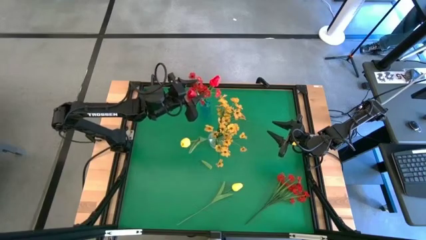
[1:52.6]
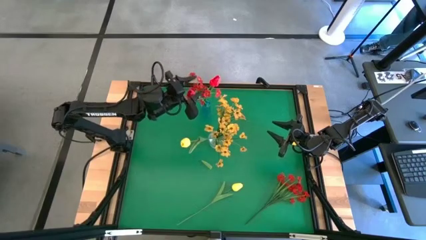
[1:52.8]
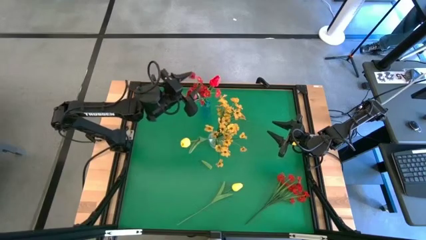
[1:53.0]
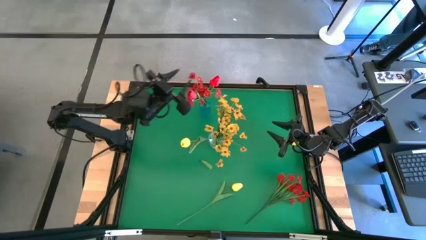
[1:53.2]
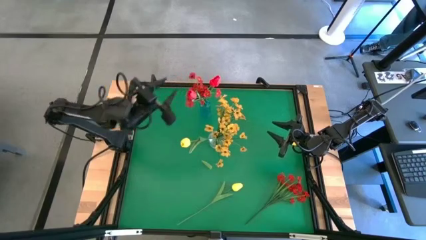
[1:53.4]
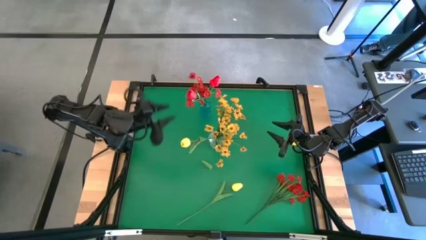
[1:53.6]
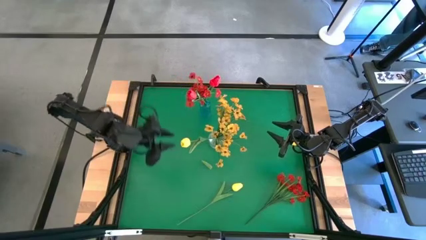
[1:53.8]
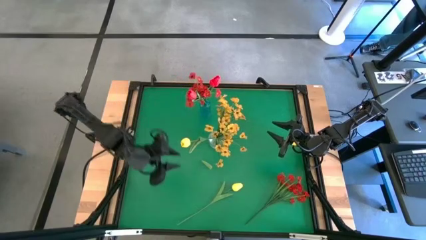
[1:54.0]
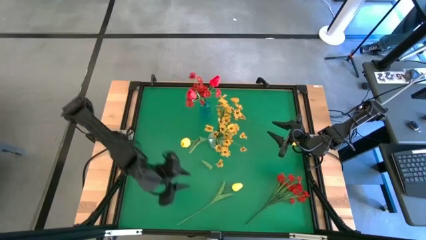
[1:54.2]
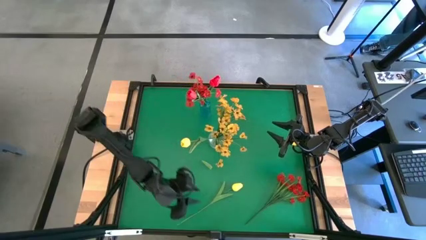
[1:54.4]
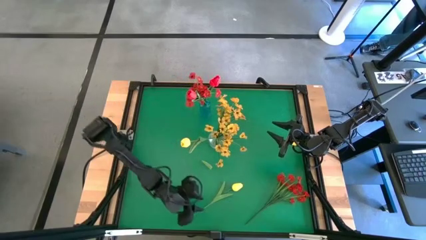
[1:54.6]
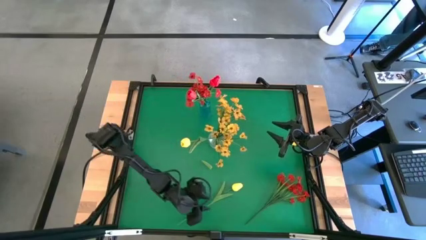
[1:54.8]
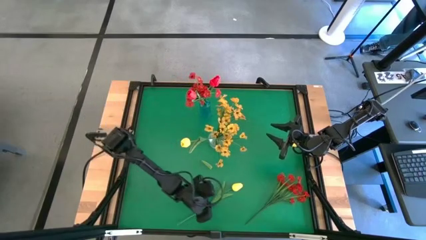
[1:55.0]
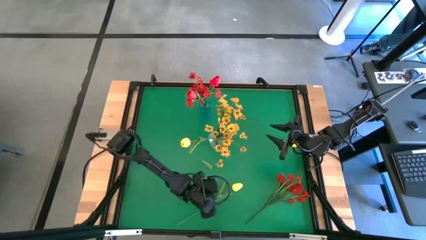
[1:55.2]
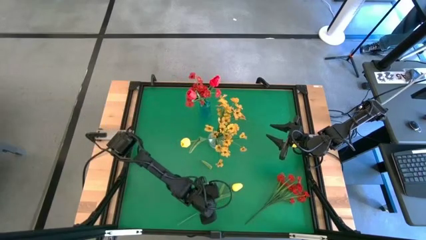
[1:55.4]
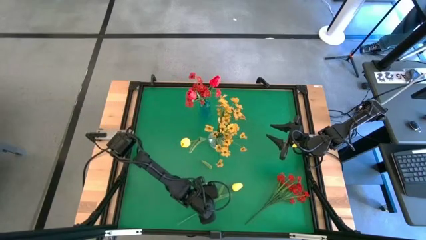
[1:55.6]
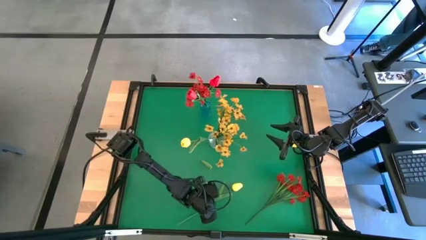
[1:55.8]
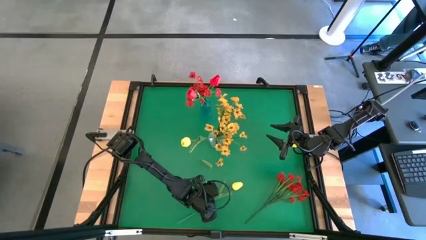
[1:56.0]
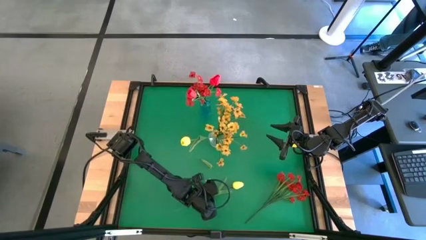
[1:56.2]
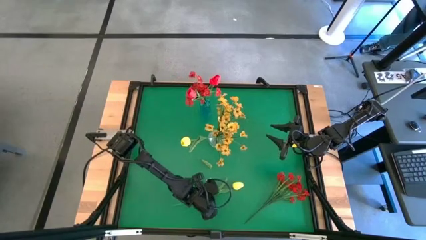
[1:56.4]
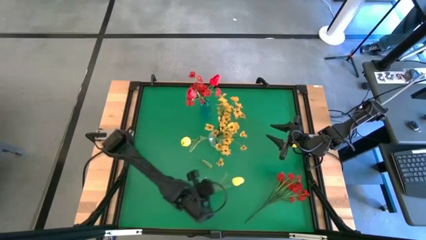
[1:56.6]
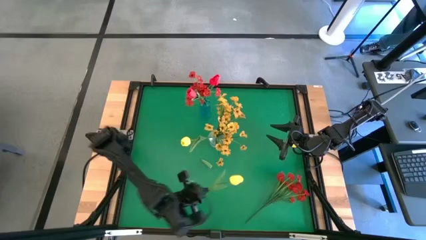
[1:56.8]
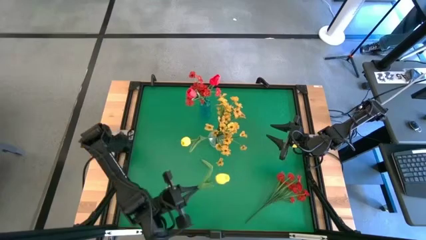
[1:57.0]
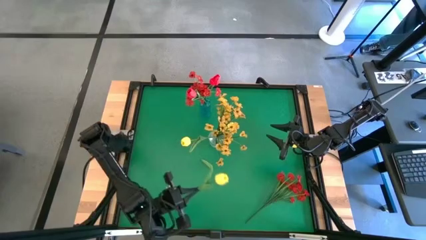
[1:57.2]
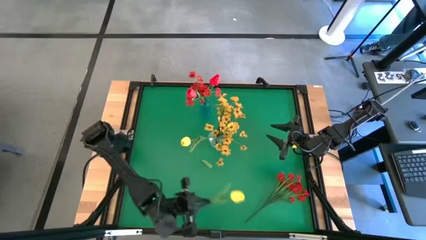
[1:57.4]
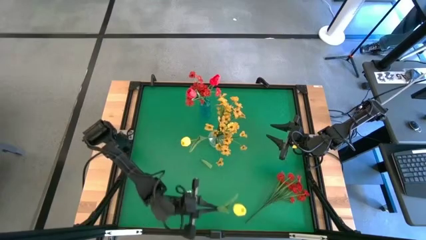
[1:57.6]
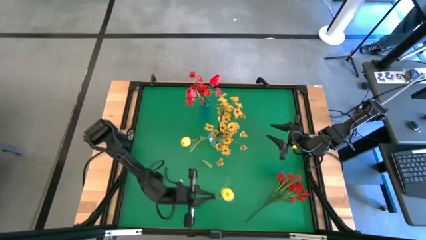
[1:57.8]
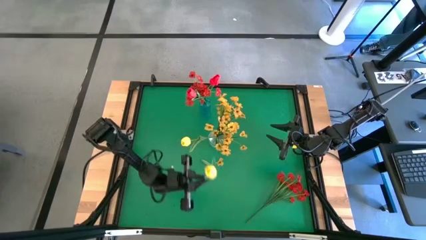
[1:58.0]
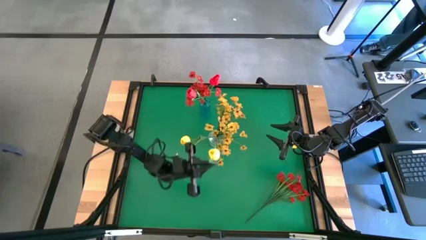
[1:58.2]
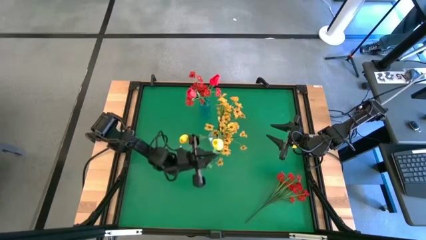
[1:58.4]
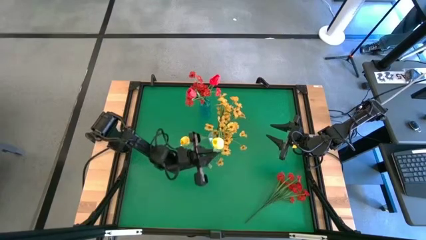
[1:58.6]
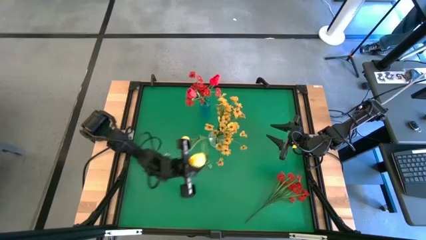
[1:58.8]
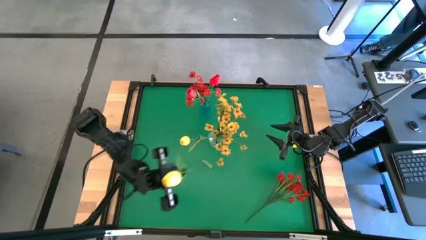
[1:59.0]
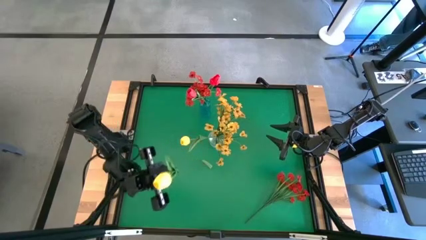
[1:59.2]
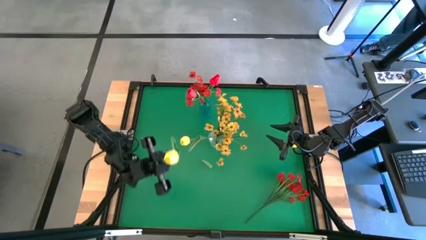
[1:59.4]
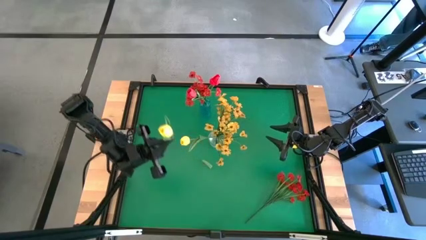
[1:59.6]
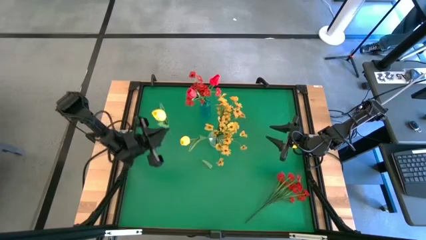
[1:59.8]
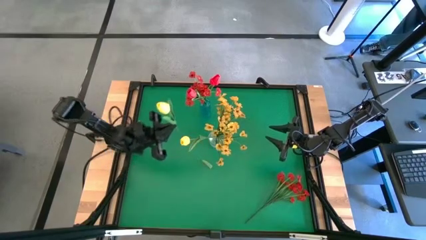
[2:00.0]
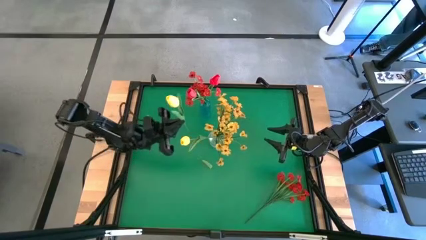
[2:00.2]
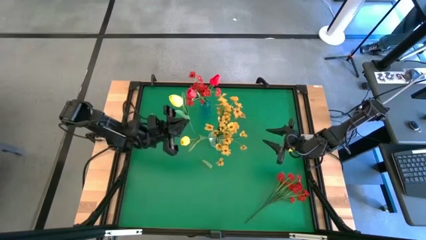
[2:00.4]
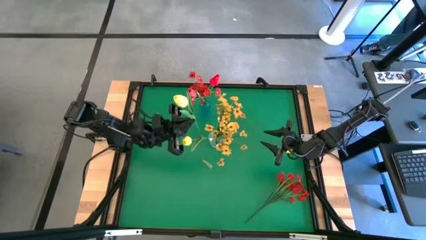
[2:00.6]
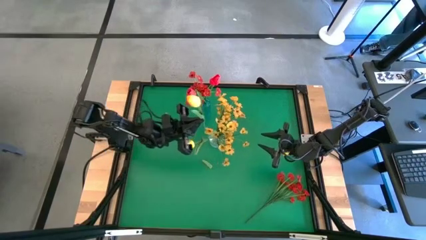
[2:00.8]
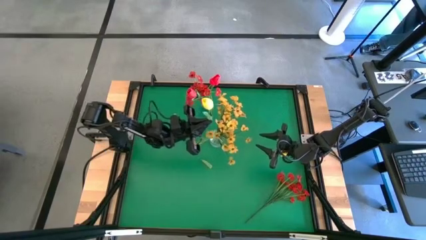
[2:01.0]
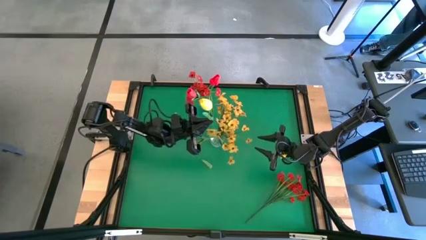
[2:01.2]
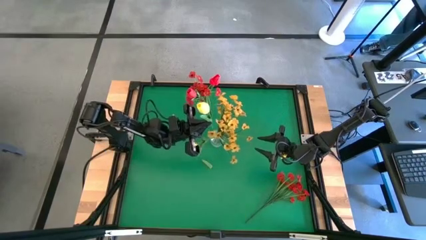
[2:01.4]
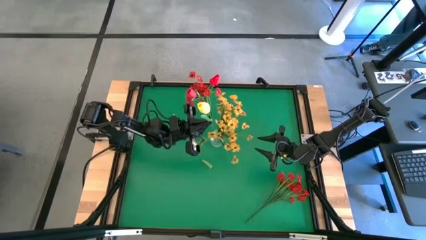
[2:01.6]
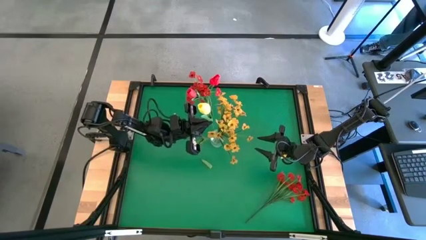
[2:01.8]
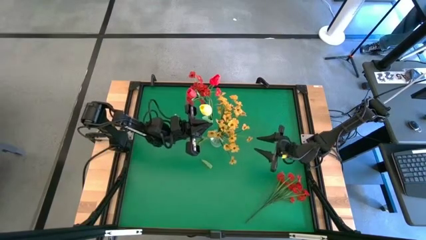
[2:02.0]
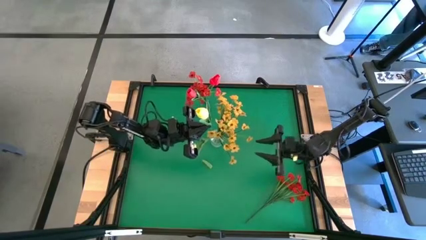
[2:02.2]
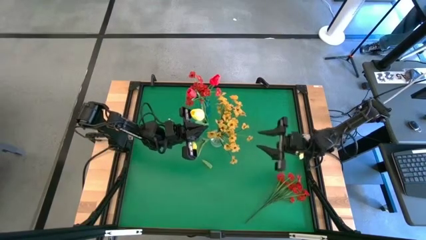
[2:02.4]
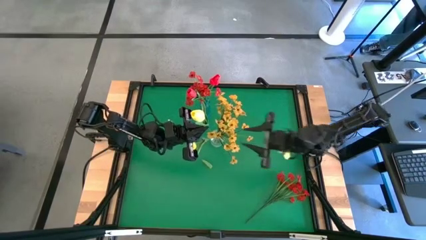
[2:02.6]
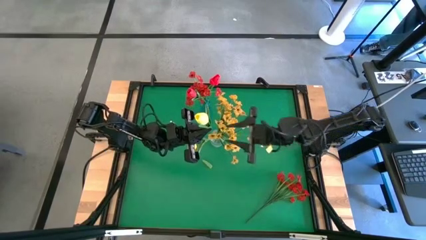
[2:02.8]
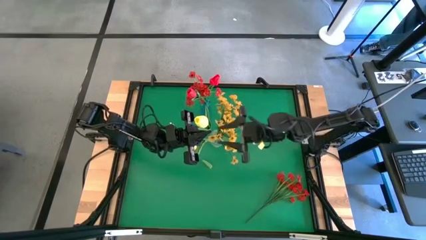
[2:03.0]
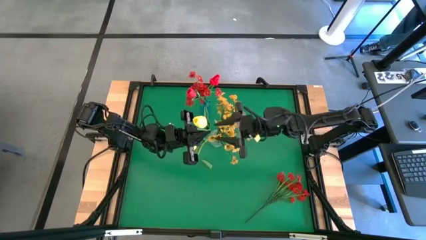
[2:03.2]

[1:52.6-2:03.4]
Task: Sort flowers into vase by color
Put the yellow flower into the transparent vase
